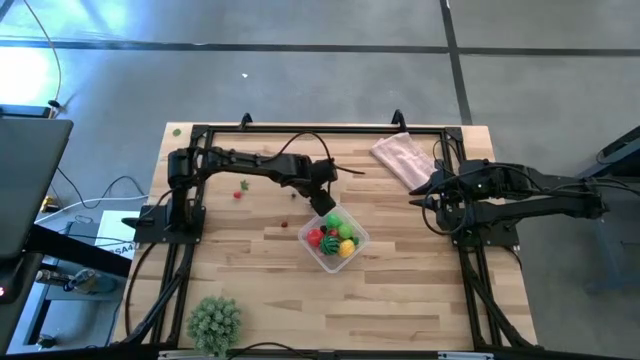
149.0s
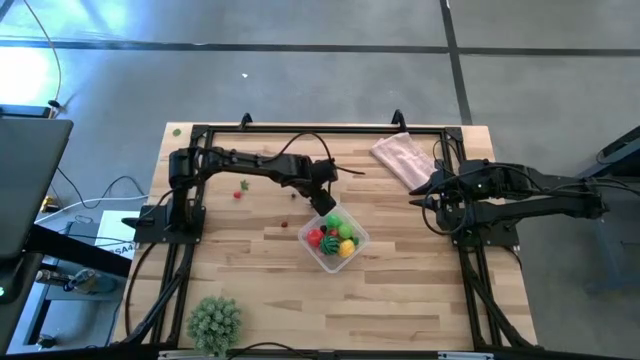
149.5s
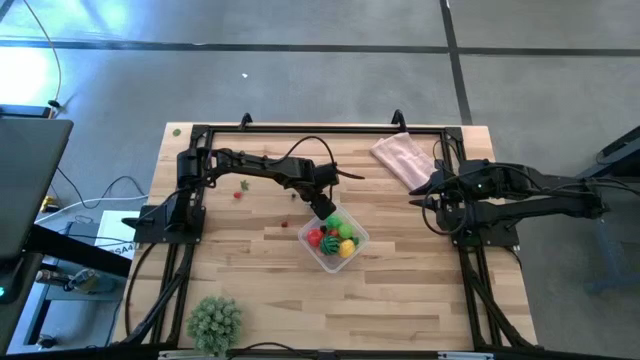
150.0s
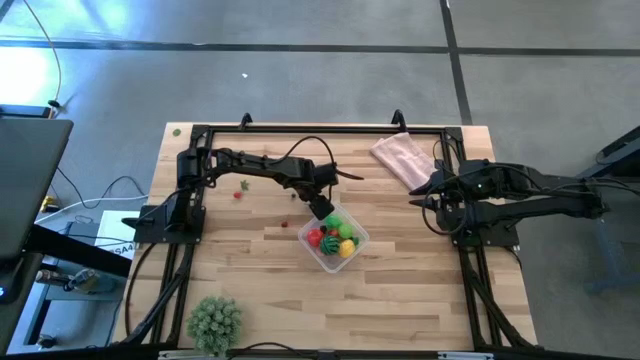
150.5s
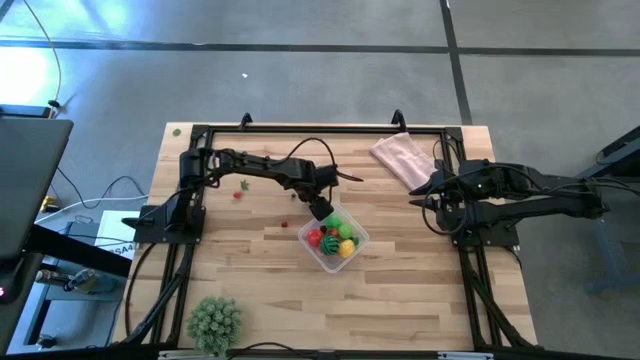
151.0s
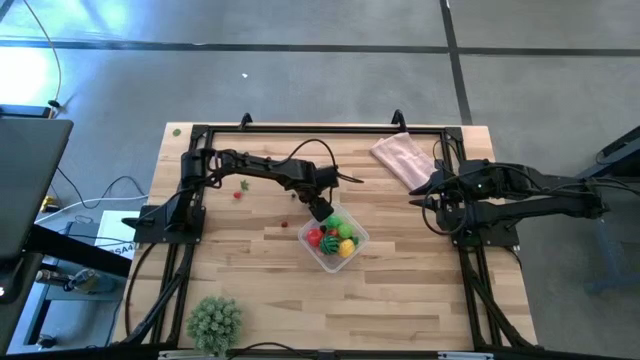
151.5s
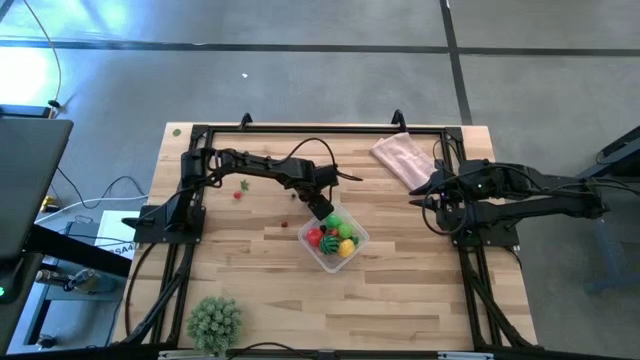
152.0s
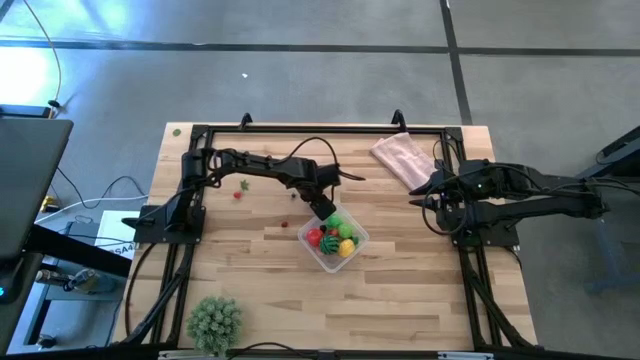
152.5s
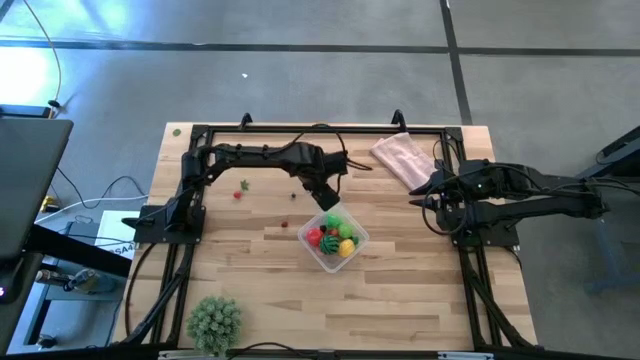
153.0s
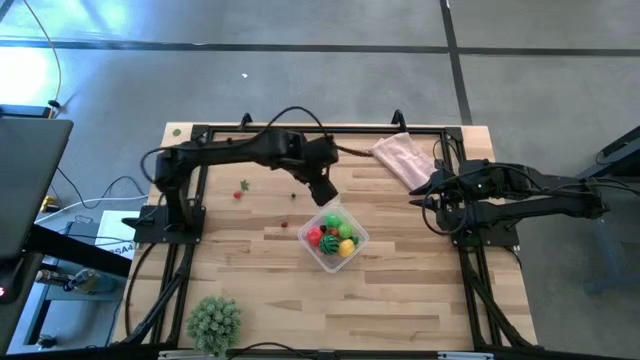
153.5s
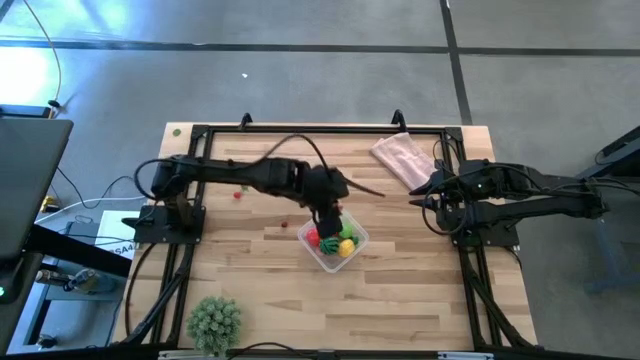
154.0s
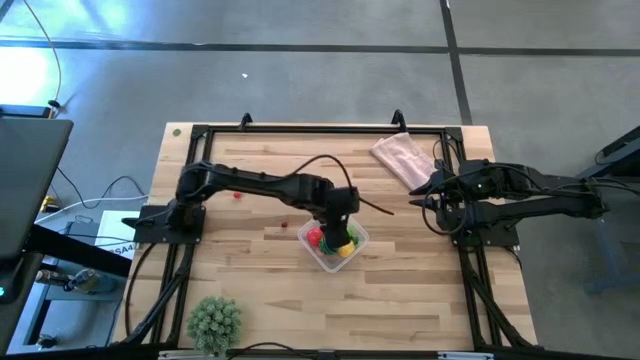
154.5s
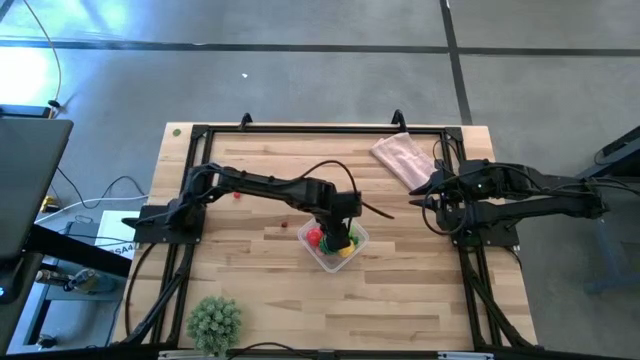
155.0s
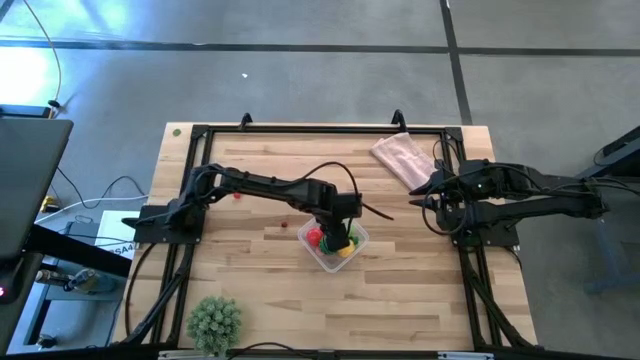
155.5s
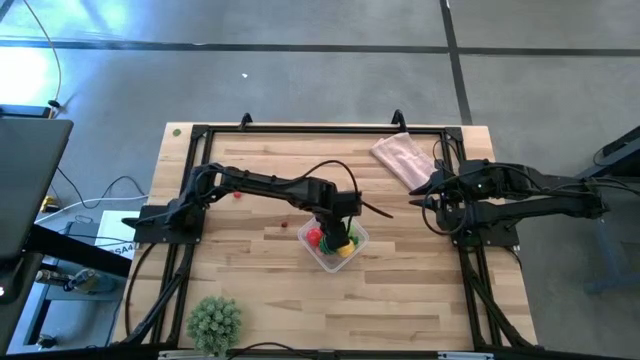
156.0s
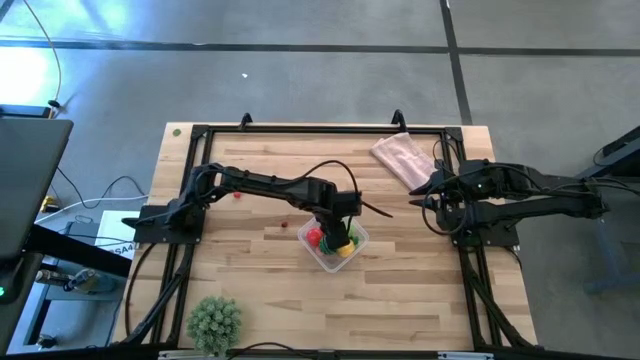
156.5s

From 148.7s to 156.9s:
Task: Pick and placing Produce into tupperware
Put the red strawberry into the transparent container

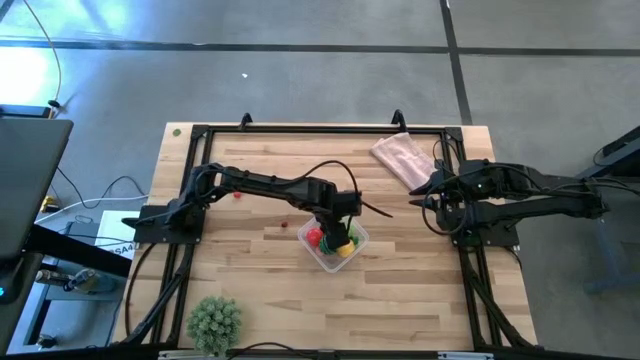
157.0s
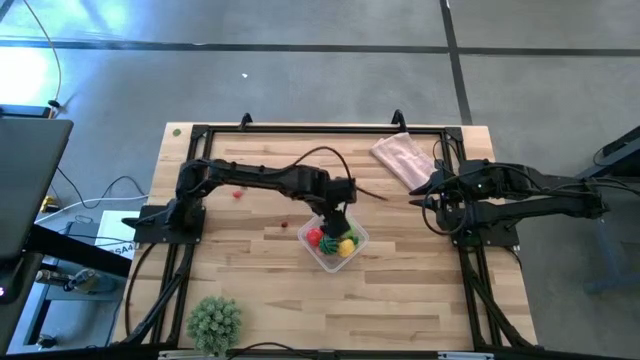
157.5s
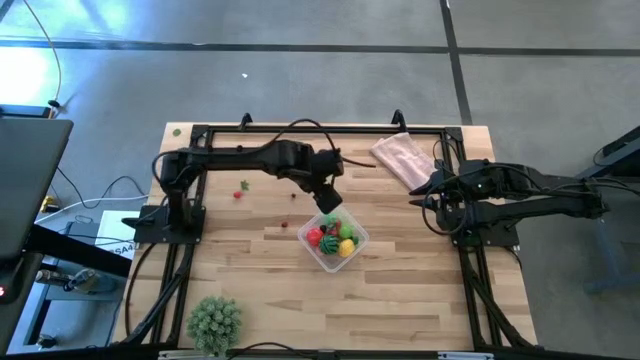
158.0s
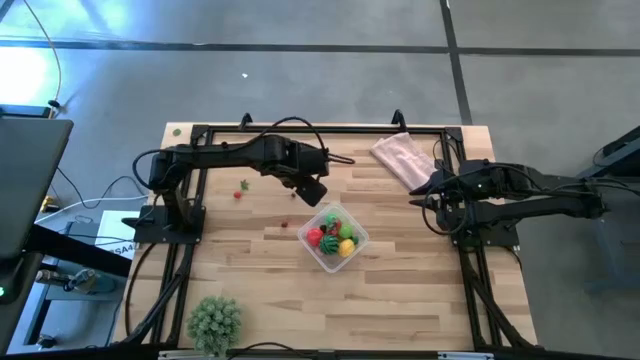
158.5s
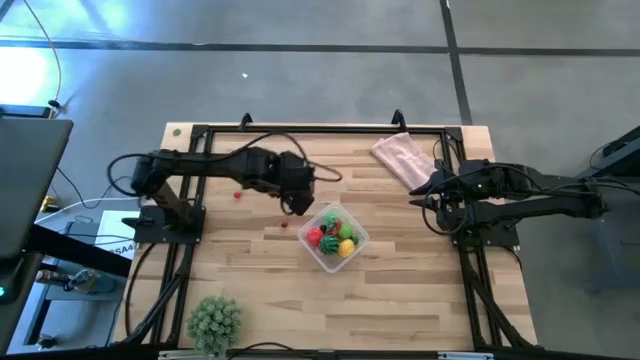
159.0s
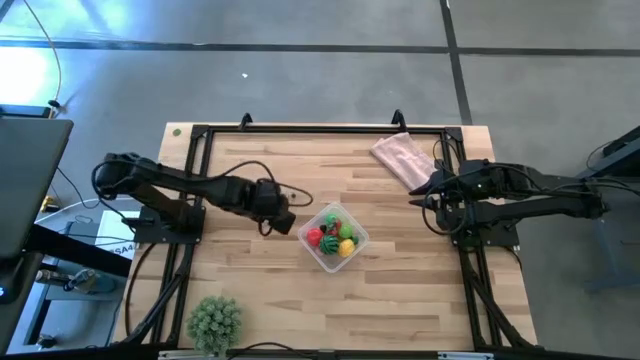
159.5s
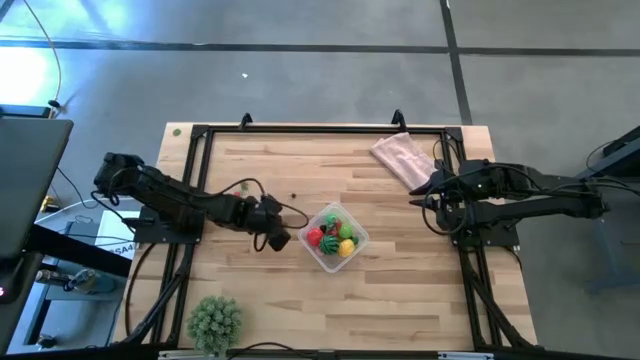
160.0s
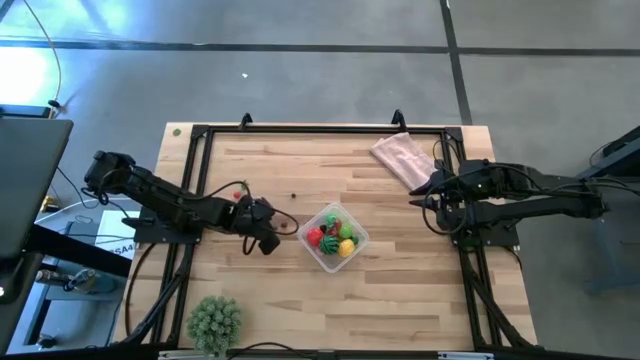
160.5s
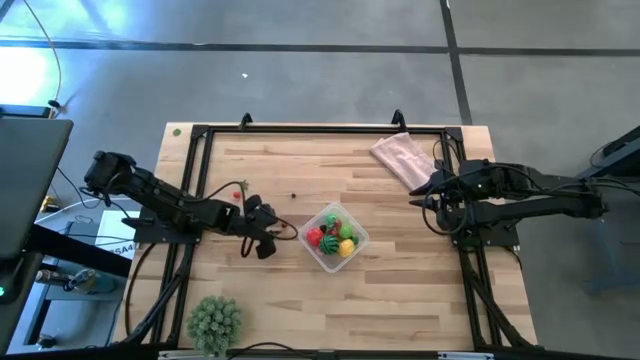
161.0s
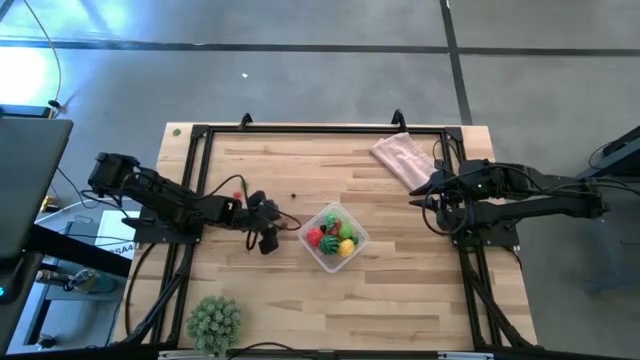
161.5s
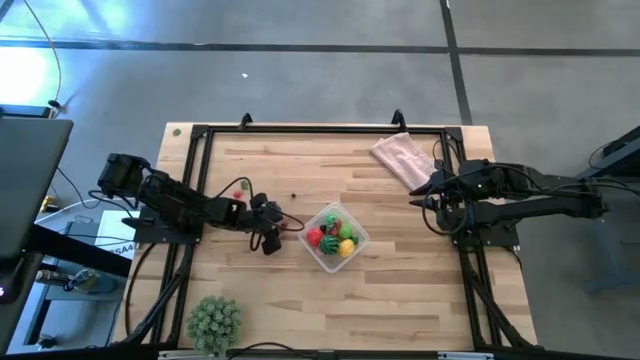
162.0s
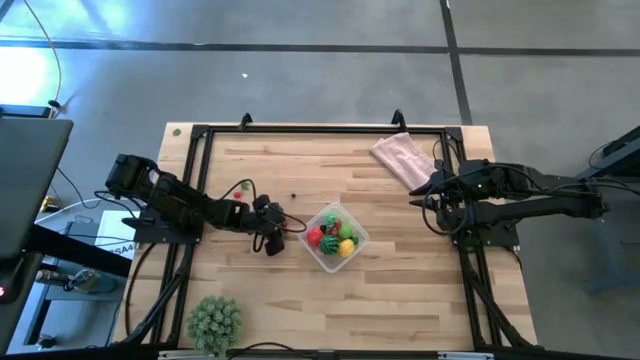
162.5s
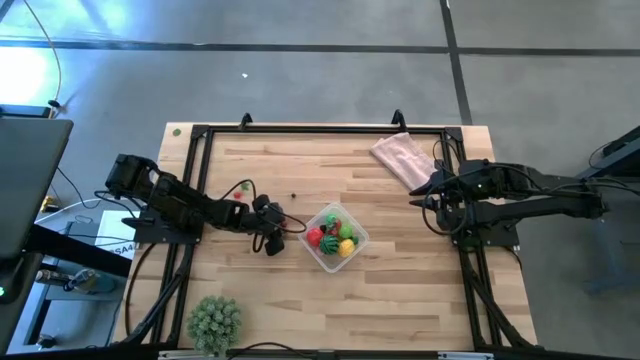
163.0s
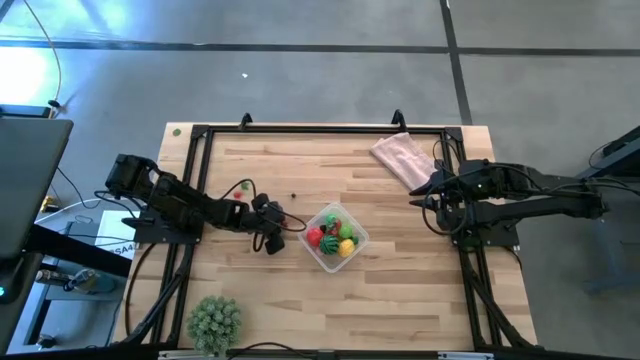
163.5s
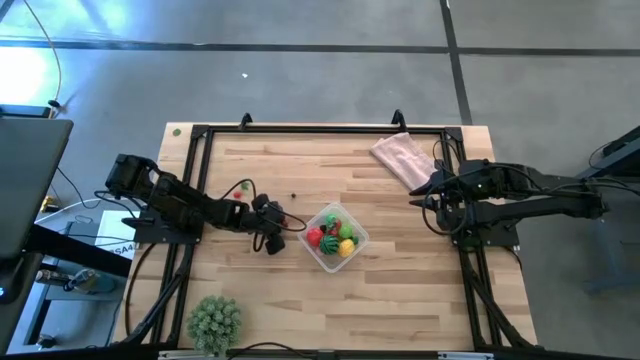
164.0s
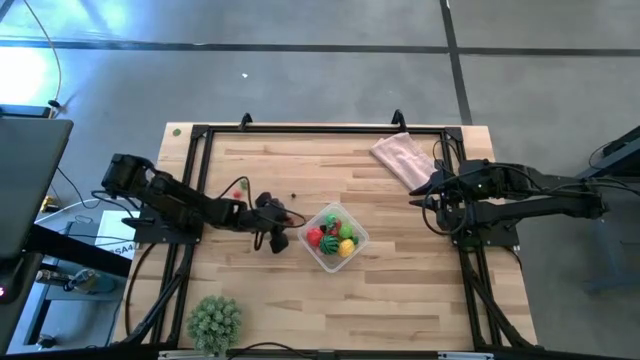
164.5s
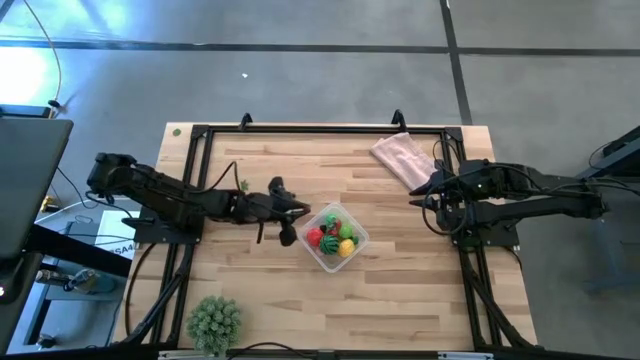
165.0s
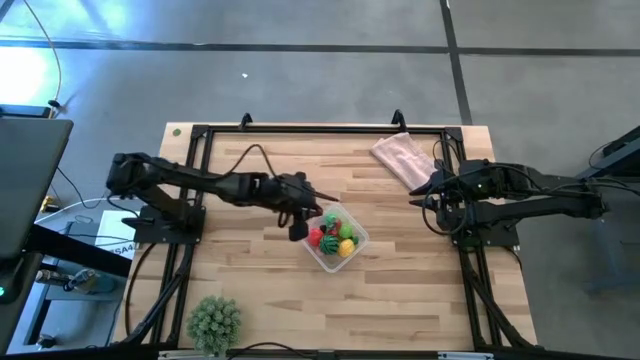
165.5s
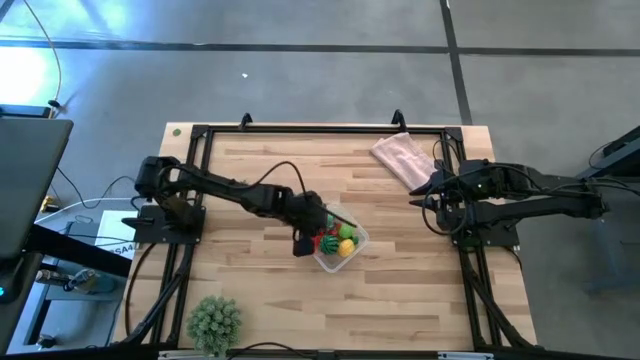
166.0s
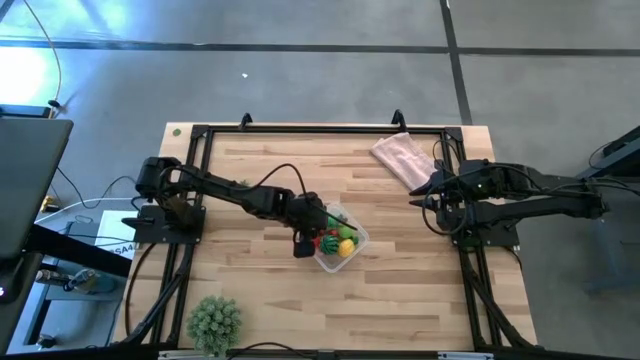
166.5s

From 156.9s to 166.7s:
Put the red cherry into the transparent container
